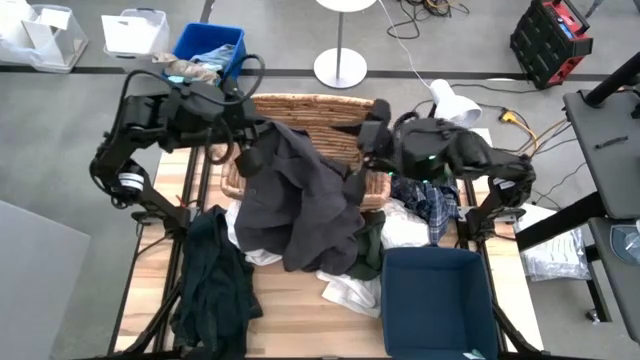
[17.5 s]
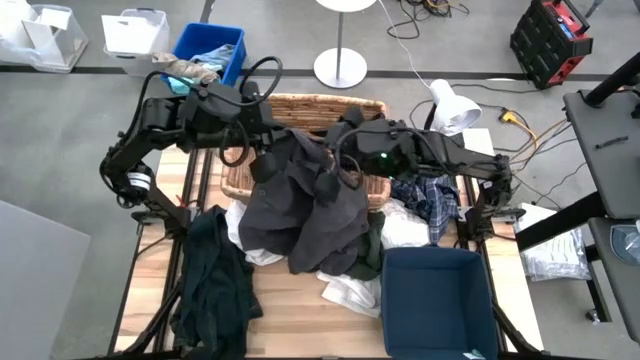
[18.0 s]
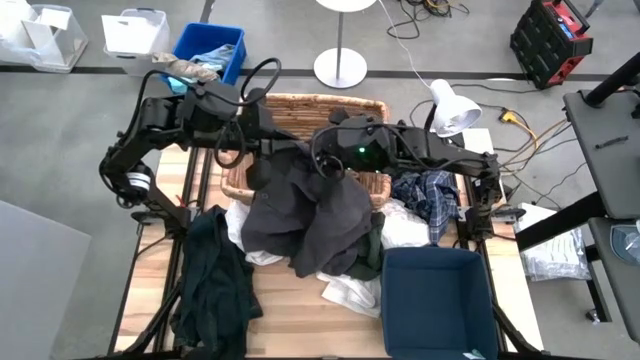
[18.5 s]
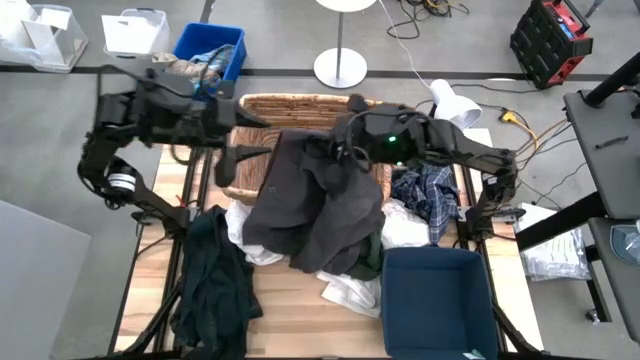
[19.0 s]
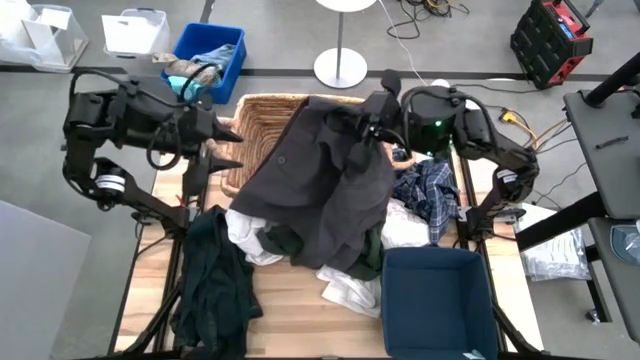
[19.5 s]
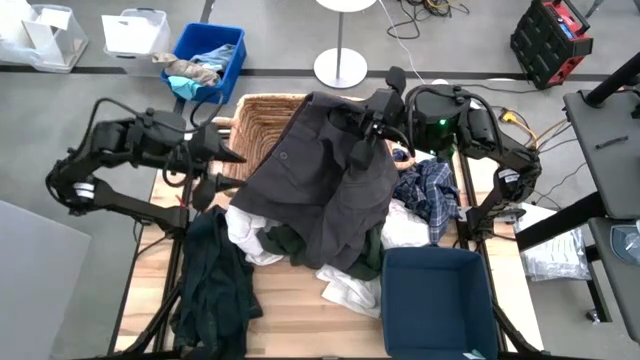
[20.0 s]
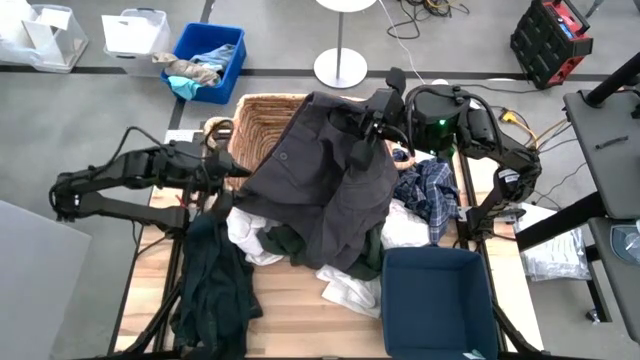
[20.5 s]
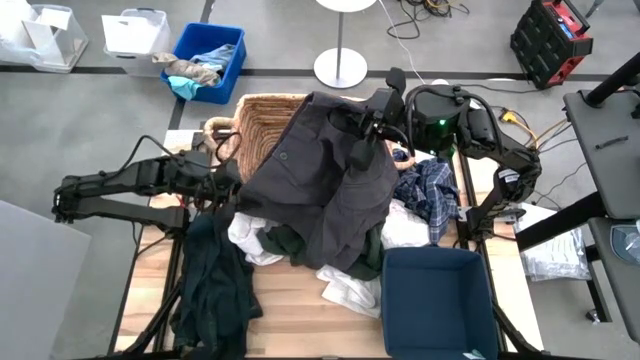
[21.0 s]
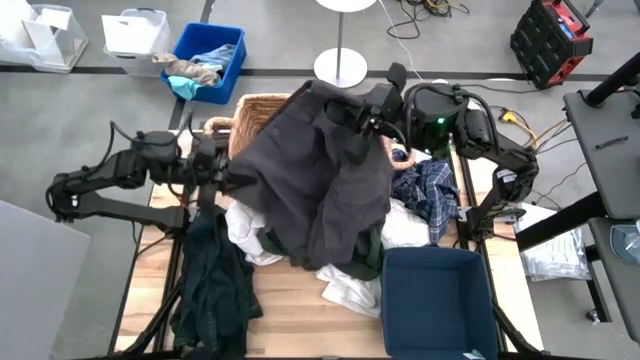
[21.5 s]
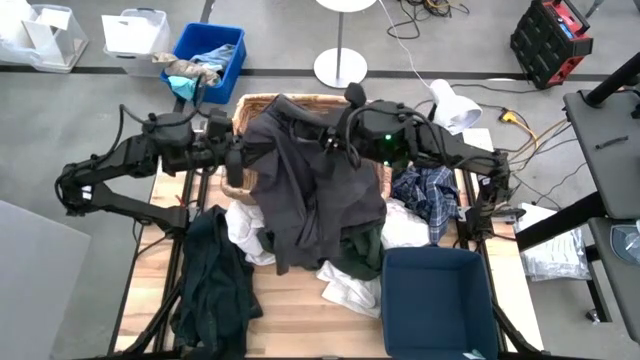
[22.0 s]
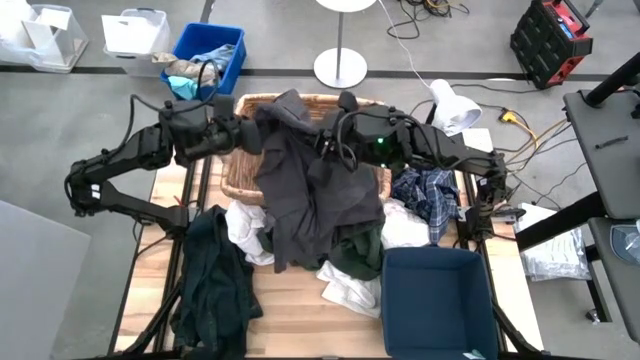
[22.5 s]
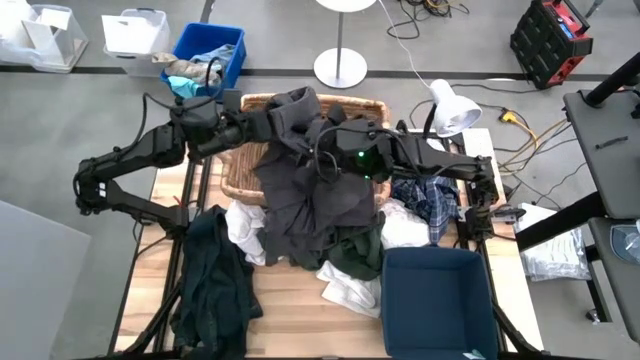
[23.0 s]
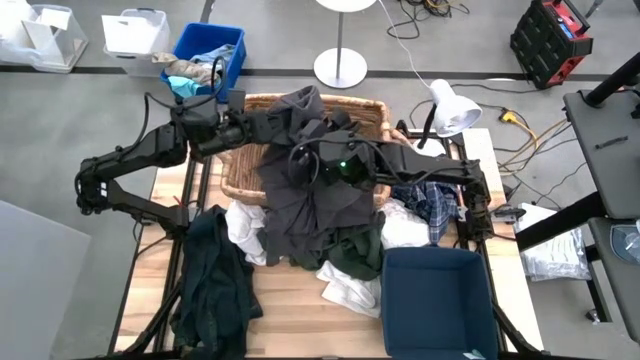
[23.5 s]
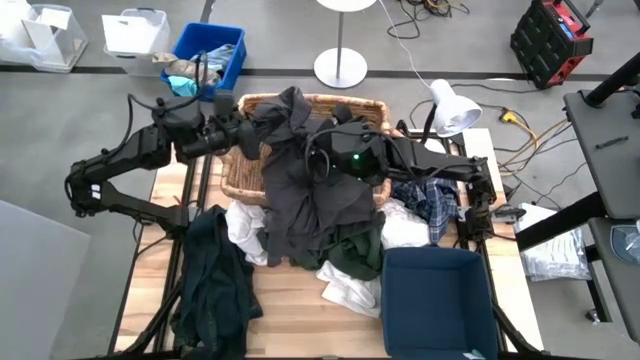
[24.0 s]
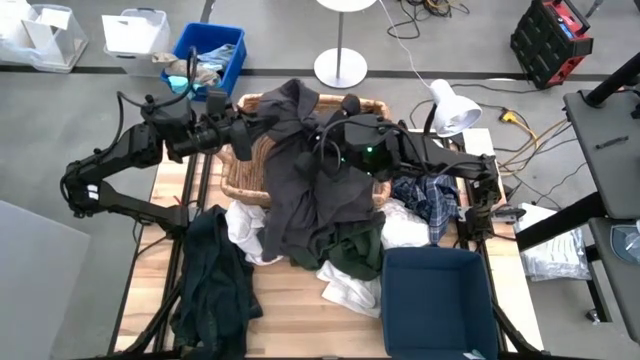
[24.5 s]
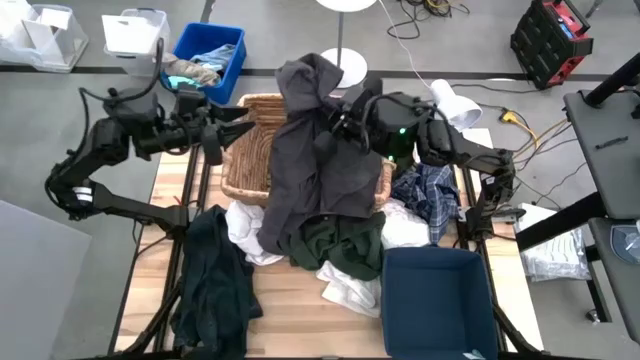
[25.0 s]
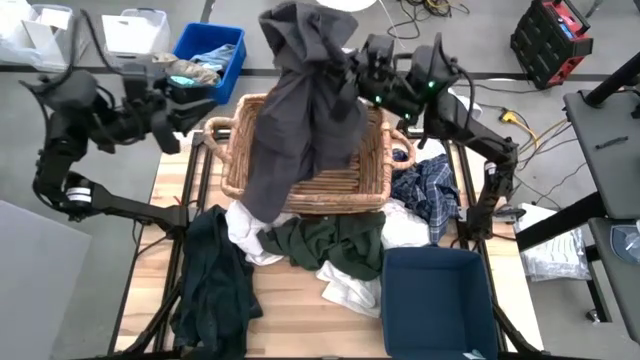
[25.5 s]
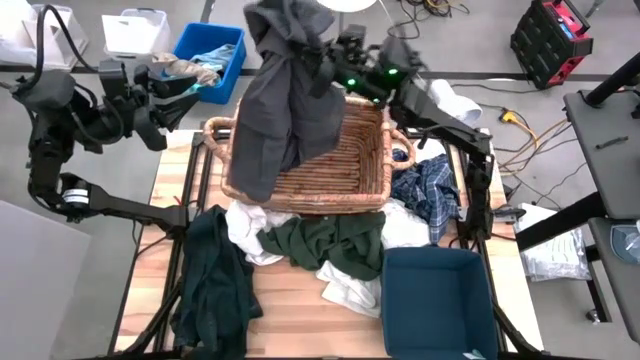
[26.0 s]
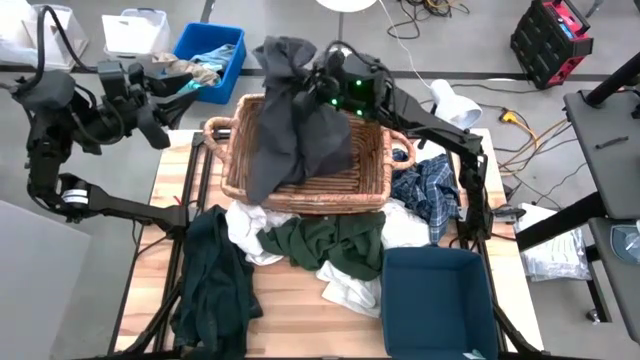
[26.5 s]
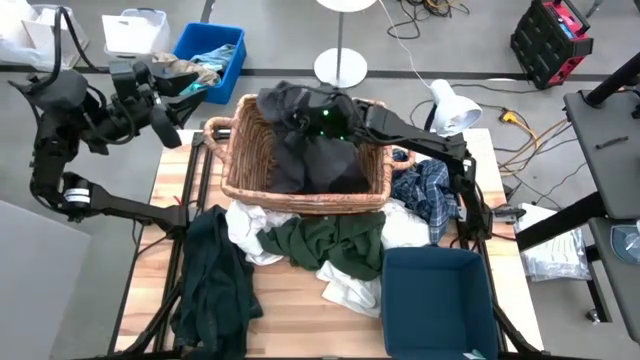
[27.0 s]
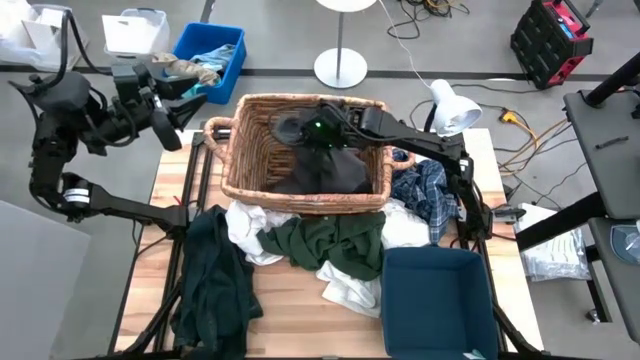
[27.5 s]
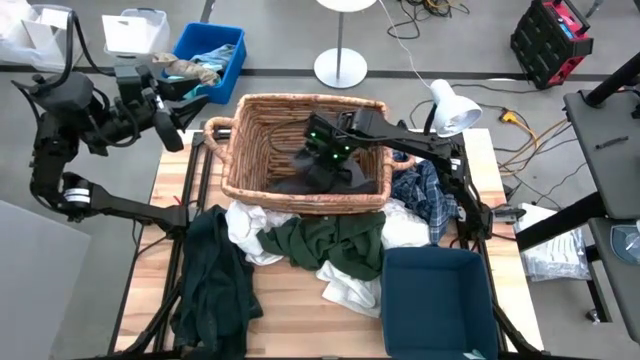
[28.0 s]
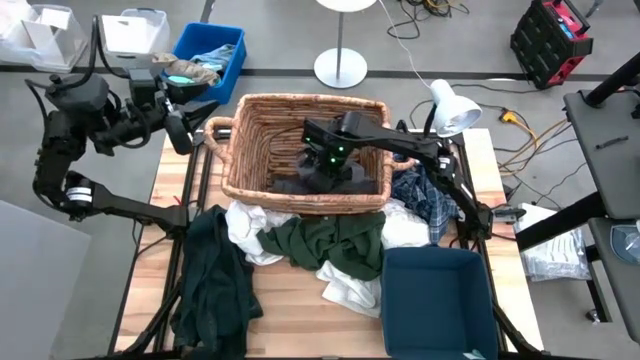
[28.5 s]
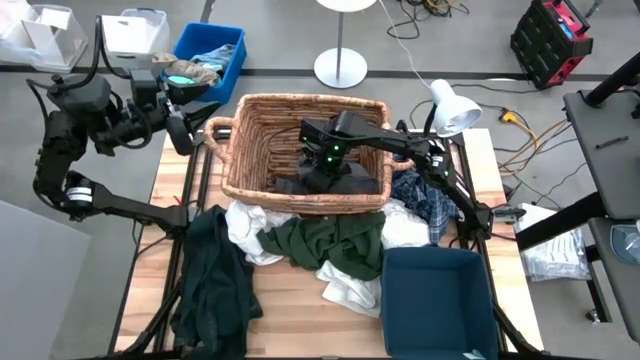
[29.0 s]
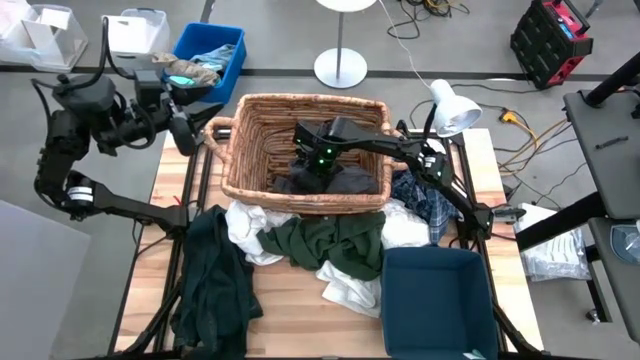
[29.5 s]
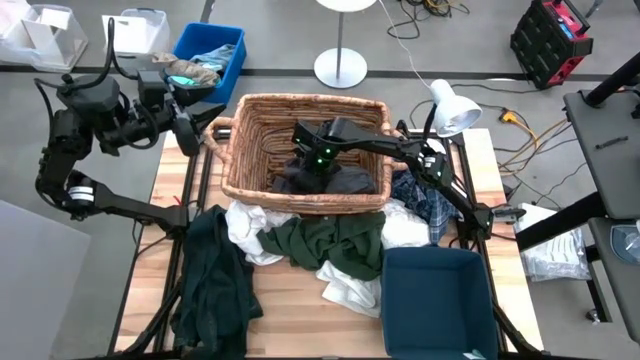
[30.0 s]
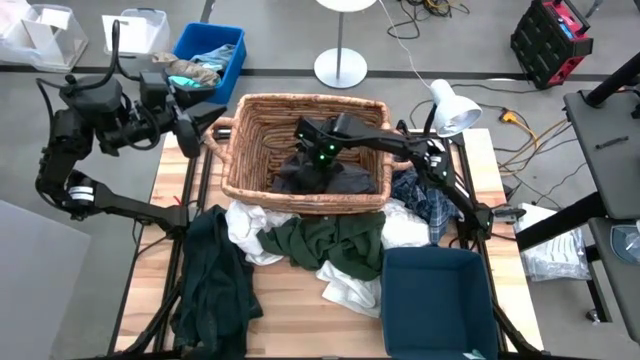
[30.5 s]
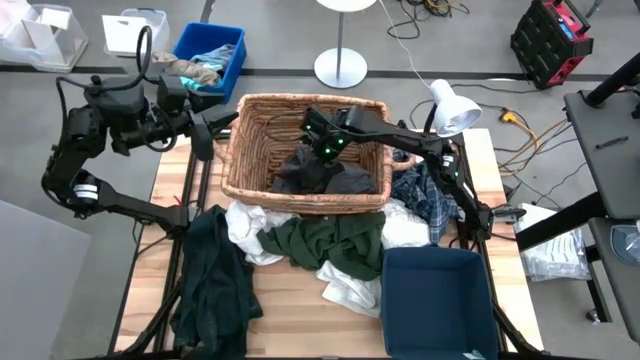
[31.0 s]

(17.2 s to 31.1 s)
Task: Sort clothes
Put the dark gray pants into the brown laundry basket

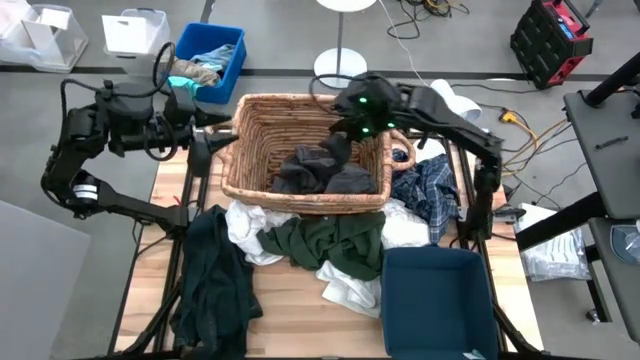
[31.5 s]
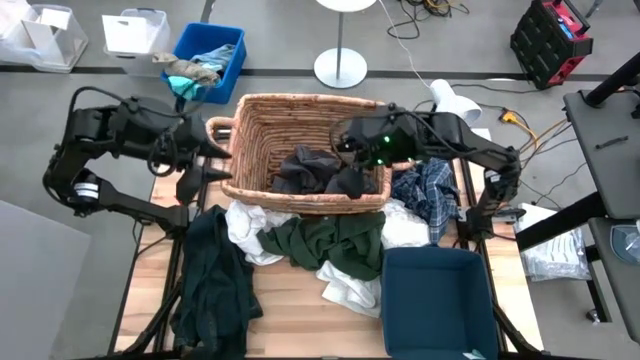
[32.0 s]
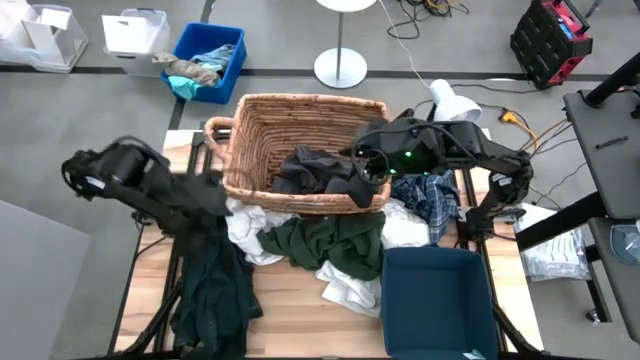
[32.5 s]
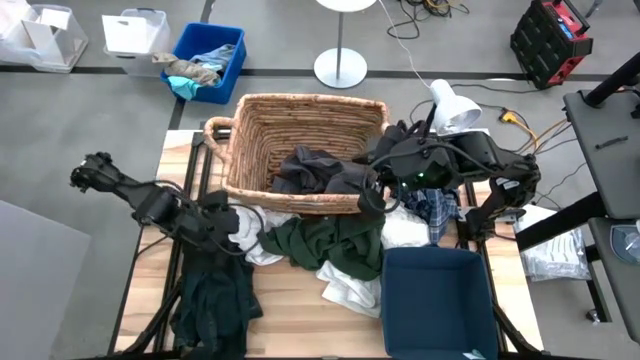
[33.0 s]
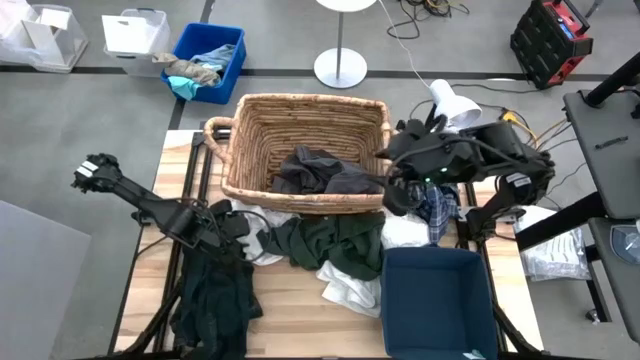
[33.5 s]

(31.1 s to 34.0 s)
Put the white polo shirt into the blue laundry bin

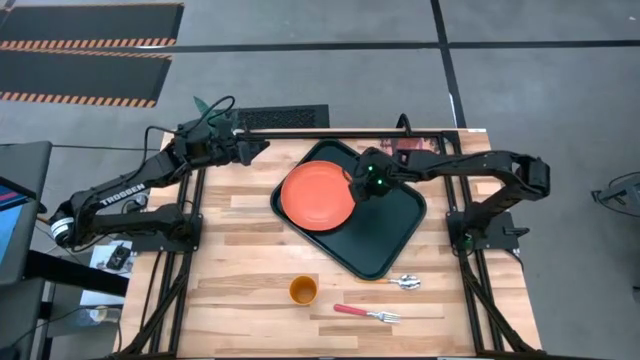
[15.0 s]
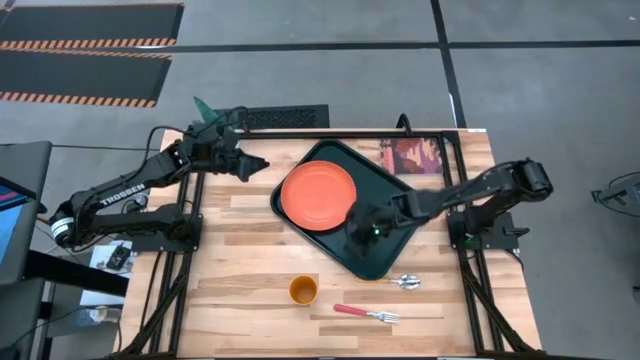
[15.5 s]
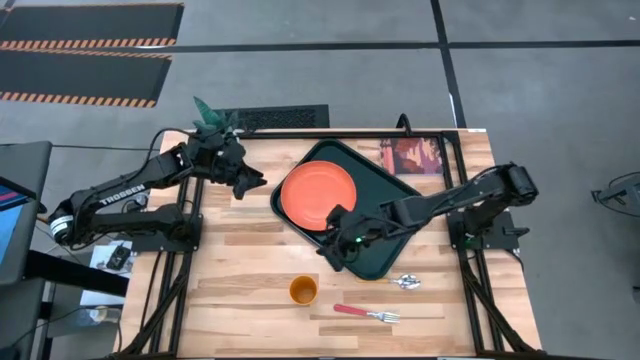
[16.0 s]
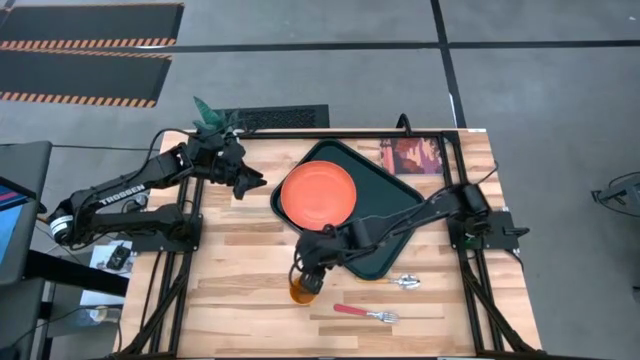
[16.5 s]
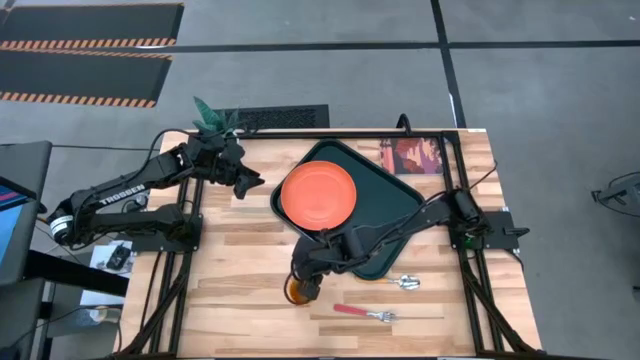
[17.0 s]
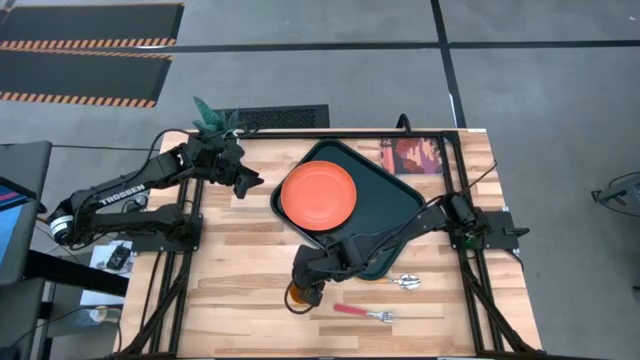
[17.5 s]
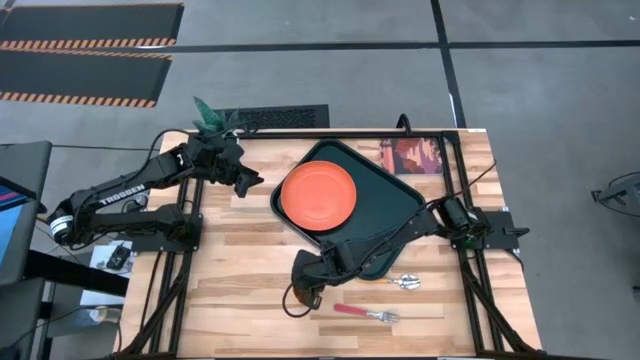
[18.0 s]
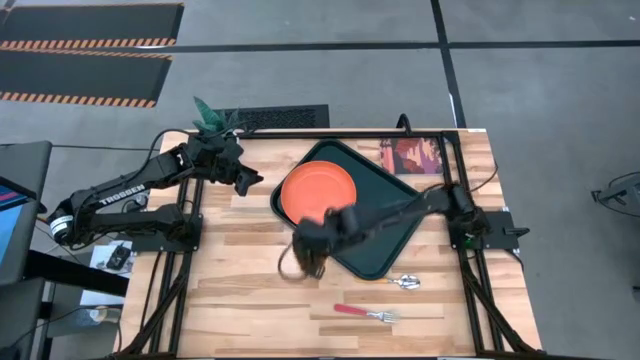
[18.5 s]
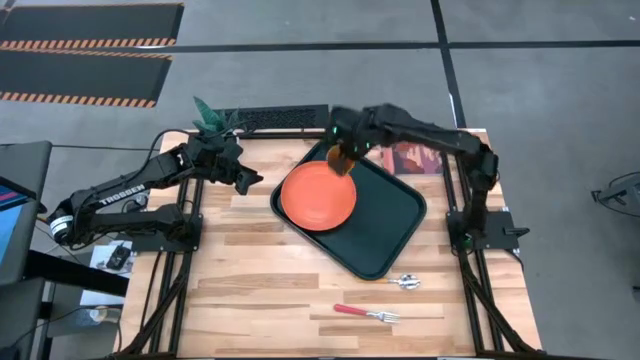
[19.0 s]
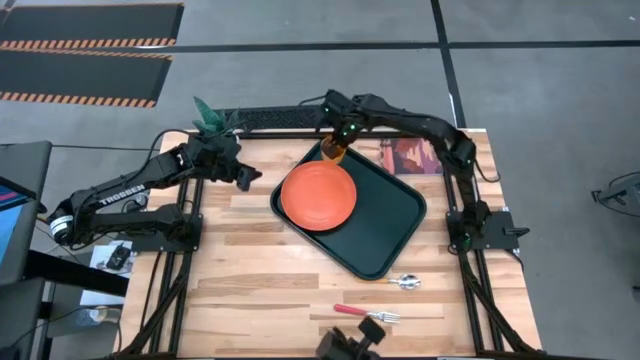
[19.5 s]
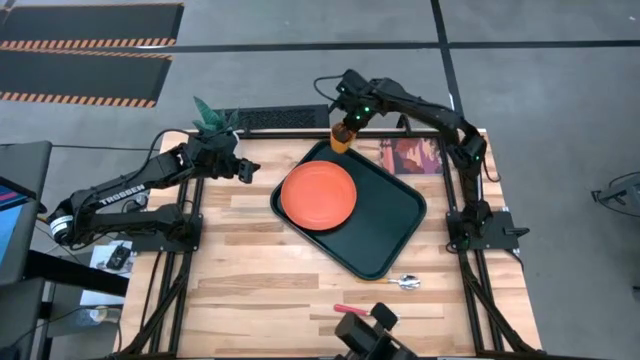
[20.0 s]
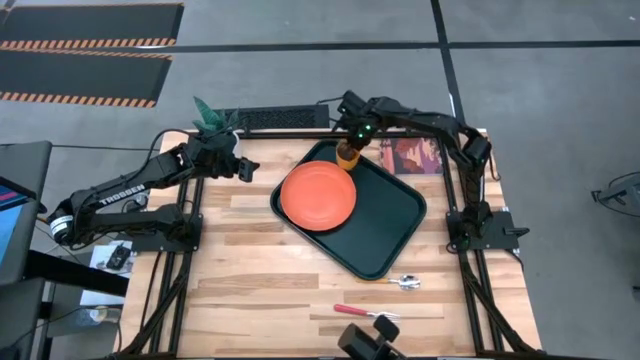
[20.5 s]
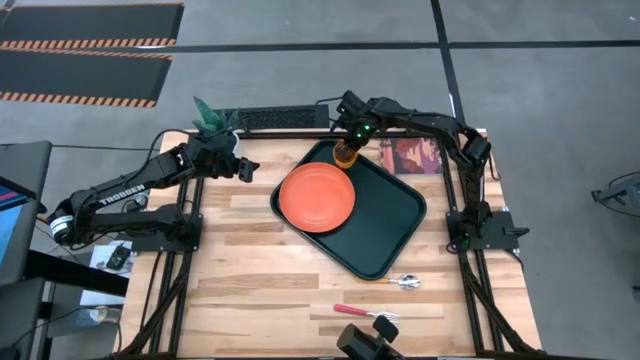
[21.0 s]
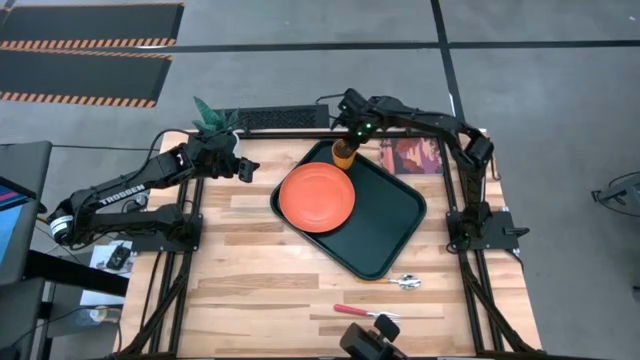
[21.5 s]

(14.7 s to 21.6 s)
Task: Pick and place plate/cup/fork/spoon on tray
Put the yellow cup on the black tray above the orange plate
